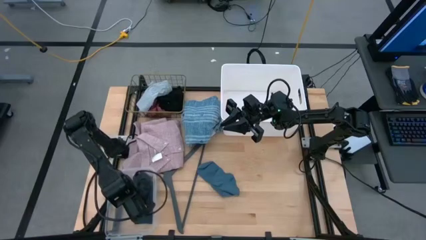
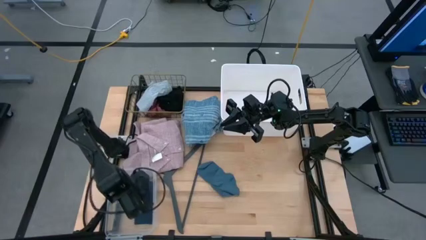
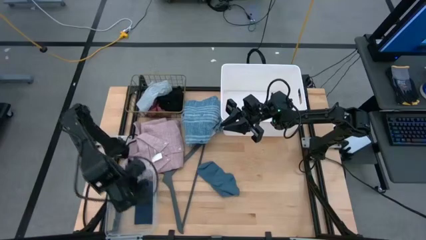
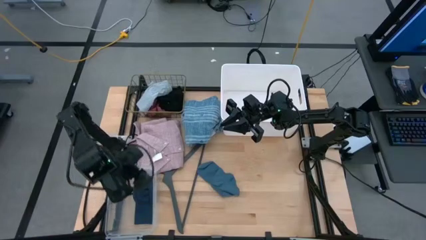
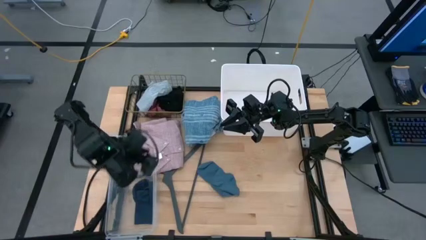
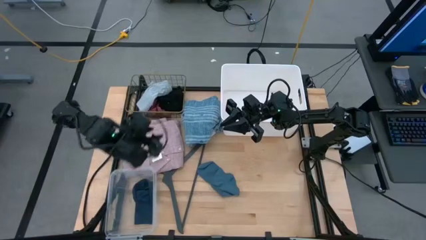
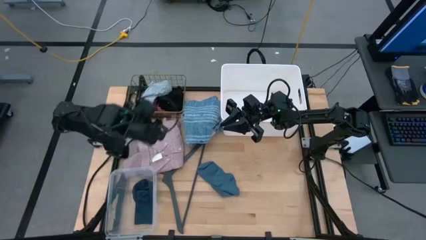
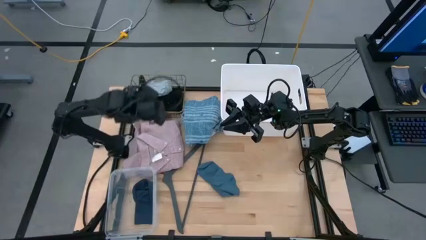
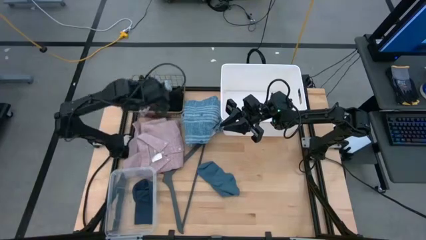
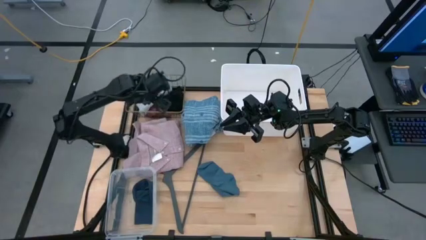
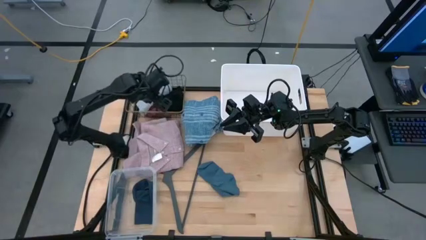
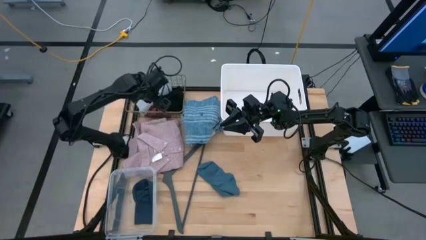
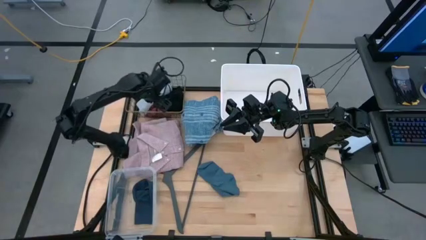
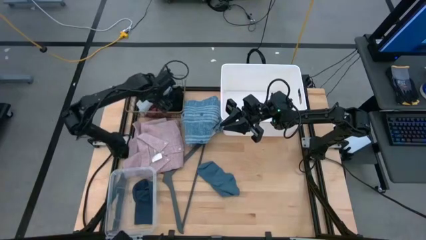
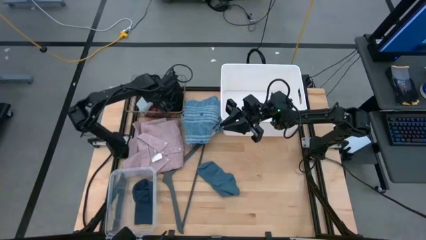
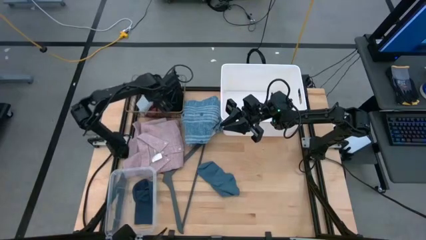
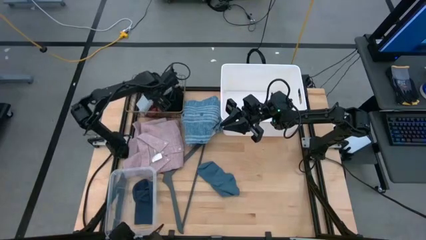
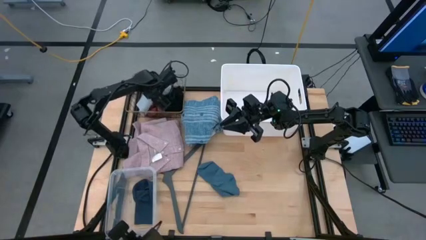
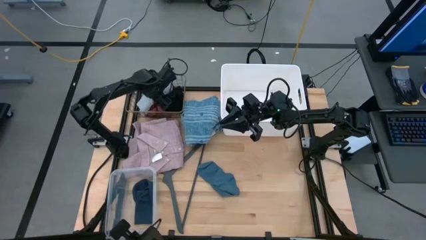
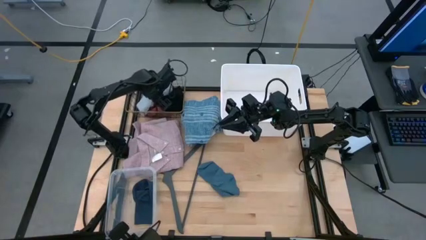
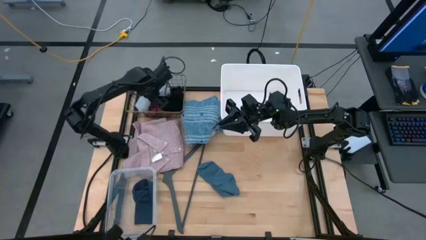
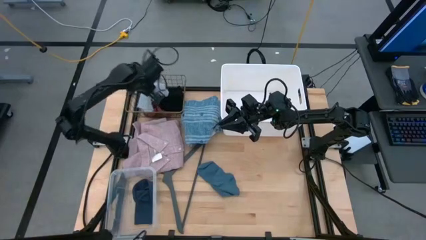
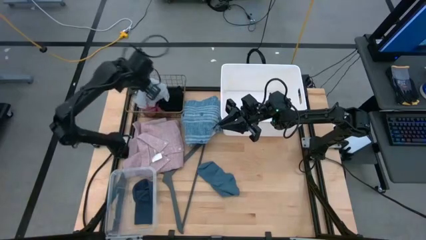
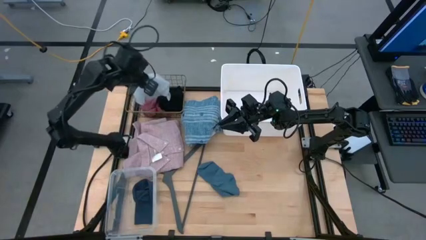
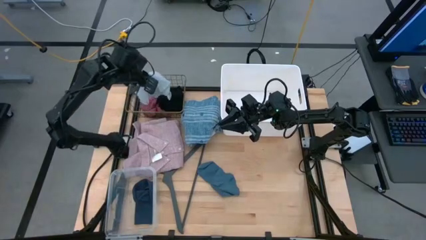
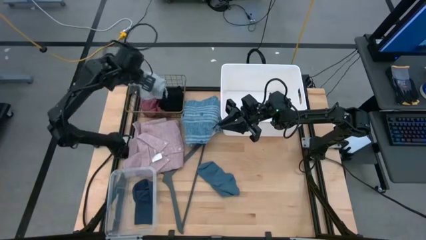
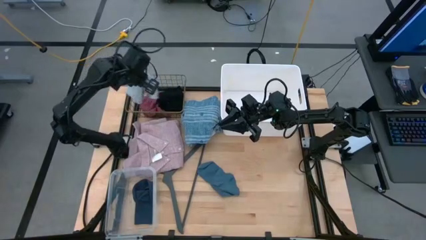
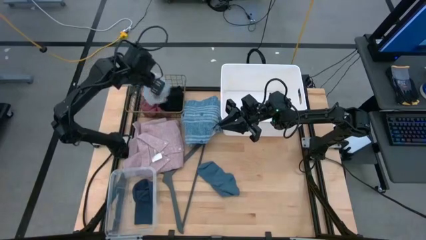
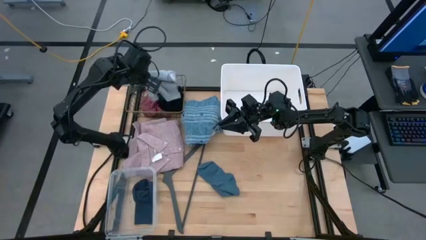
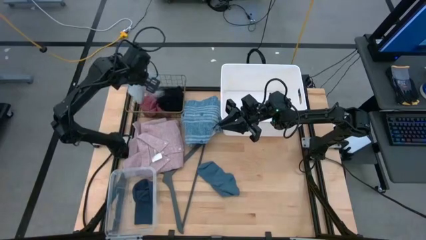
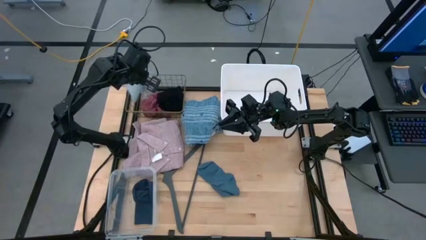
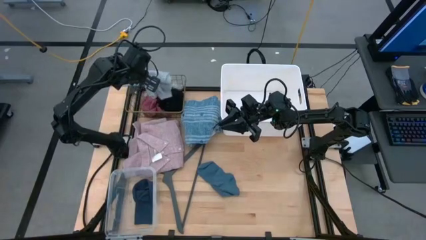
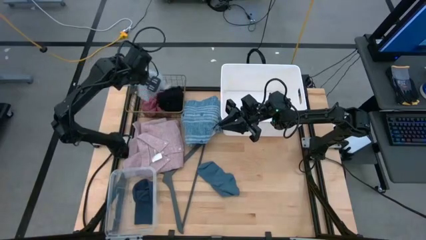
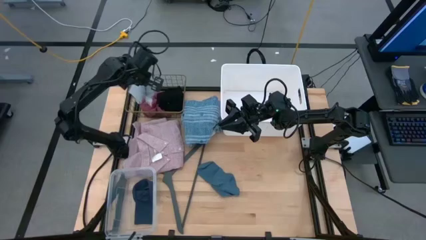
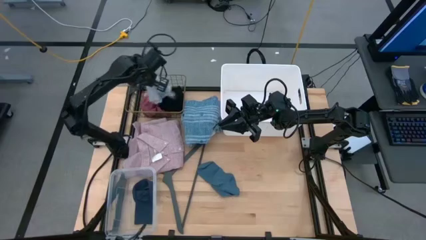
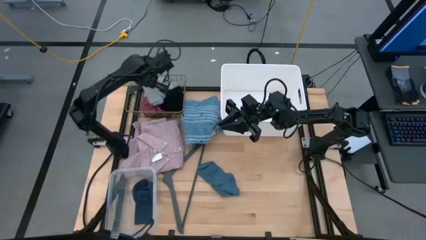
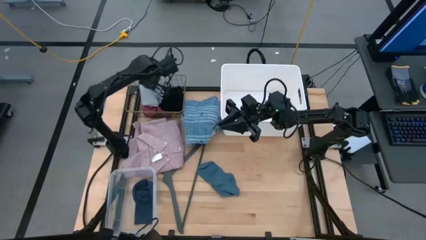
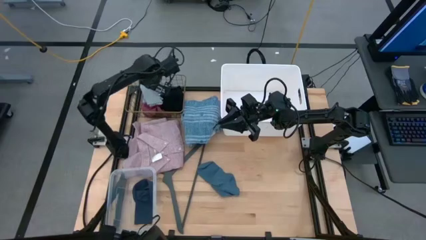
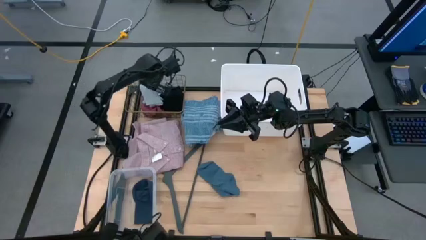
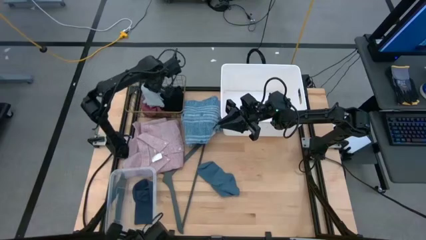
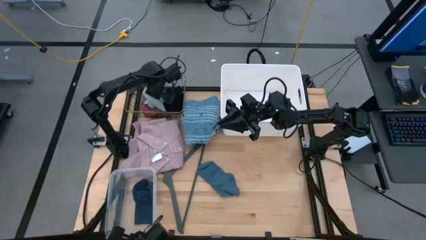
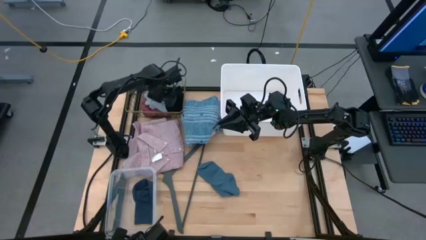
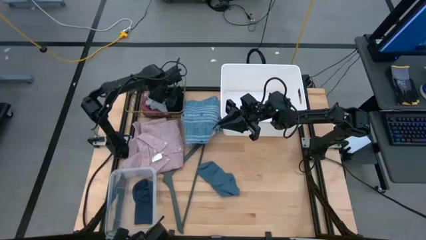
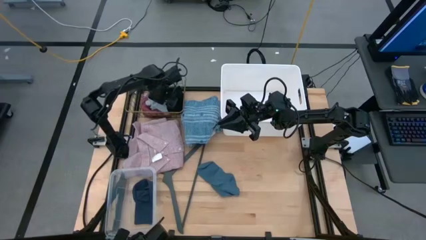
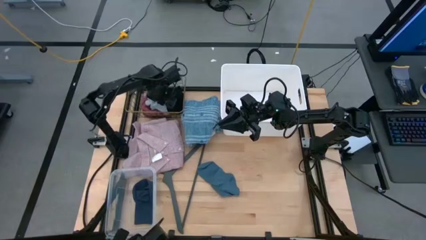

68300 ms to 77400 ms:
Task: Pick & Place Cloths
Adjust the gray undergarment in the gold wire basket
